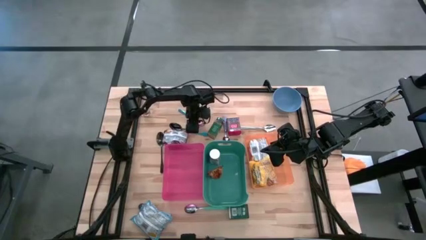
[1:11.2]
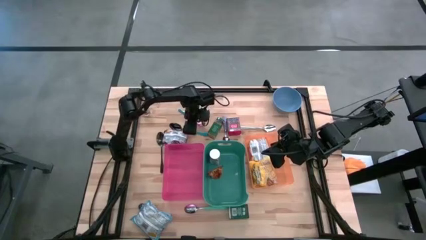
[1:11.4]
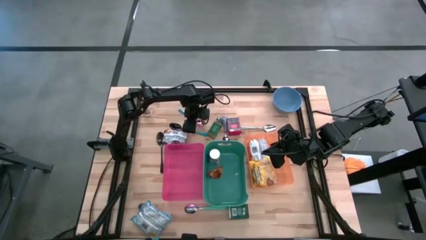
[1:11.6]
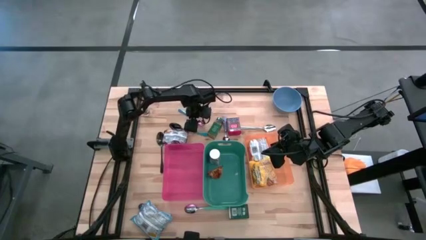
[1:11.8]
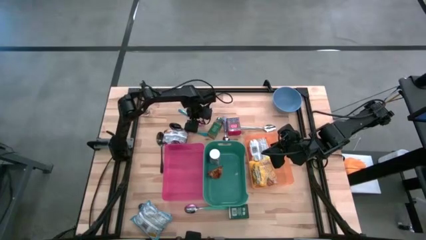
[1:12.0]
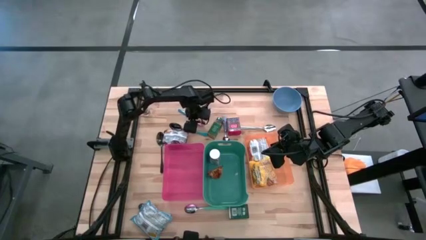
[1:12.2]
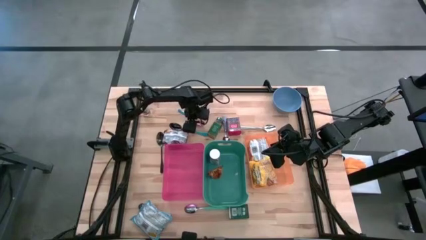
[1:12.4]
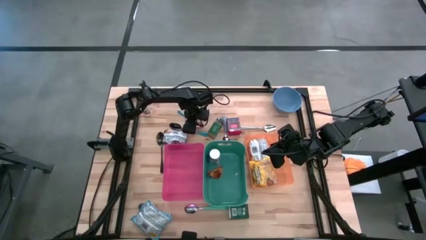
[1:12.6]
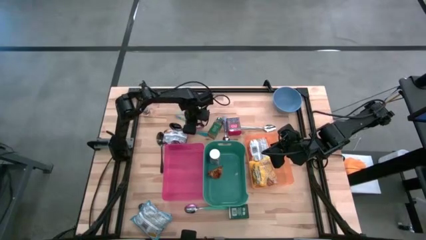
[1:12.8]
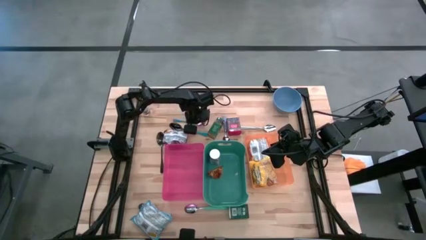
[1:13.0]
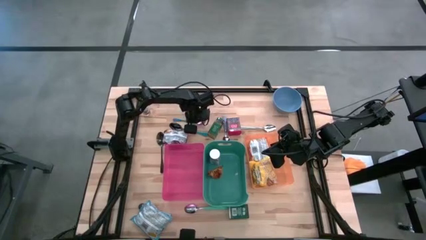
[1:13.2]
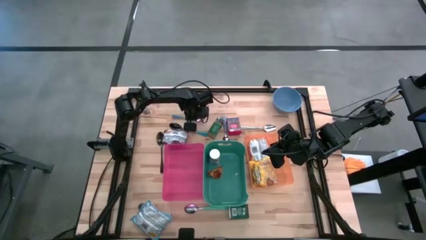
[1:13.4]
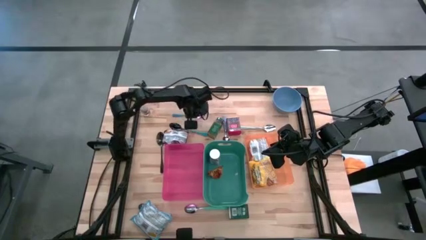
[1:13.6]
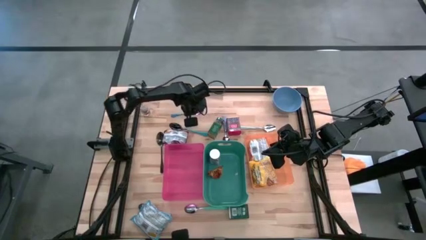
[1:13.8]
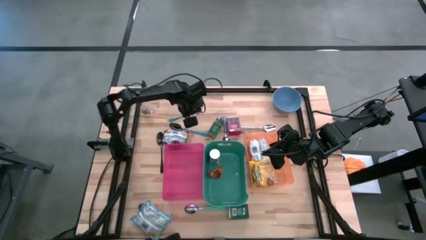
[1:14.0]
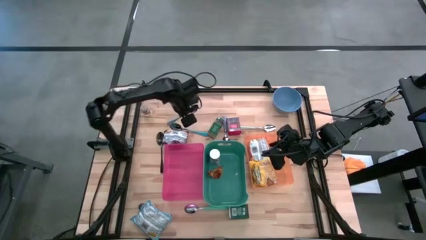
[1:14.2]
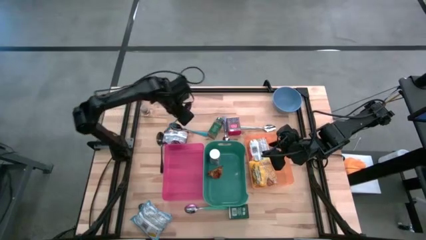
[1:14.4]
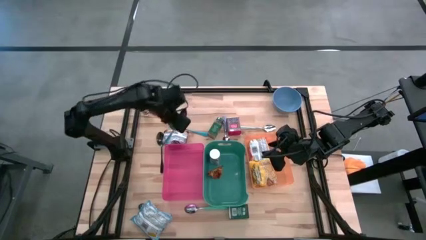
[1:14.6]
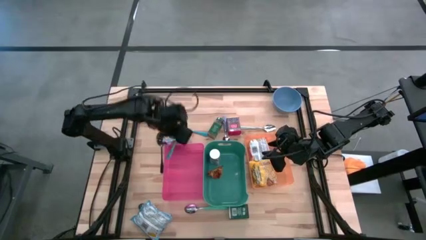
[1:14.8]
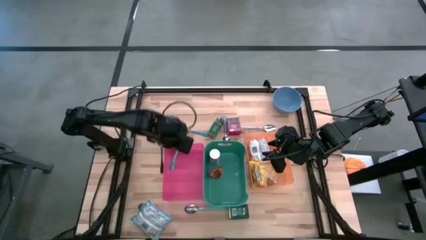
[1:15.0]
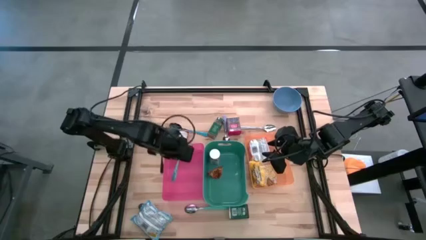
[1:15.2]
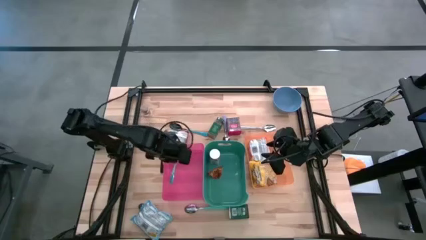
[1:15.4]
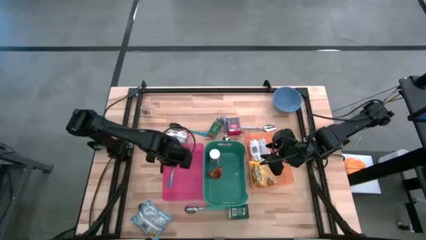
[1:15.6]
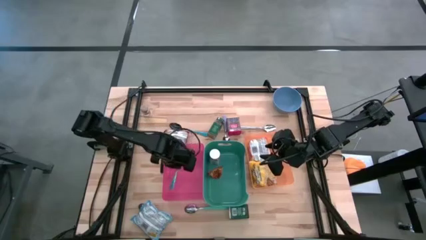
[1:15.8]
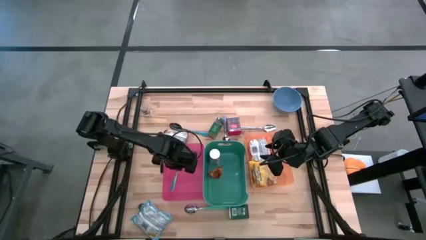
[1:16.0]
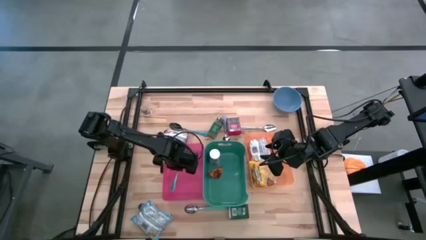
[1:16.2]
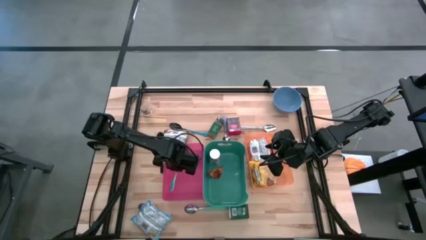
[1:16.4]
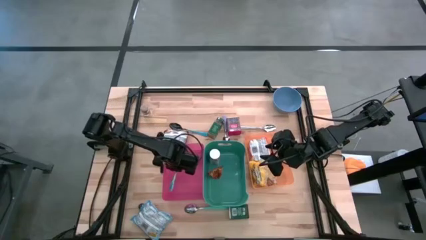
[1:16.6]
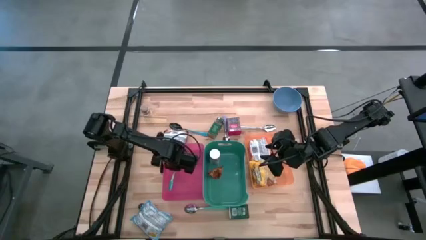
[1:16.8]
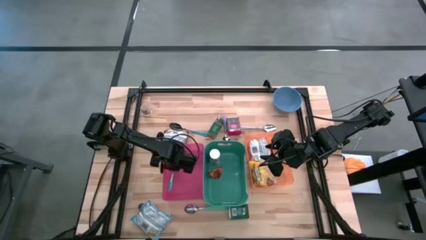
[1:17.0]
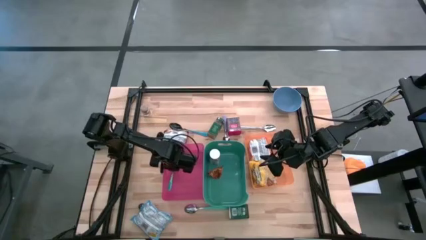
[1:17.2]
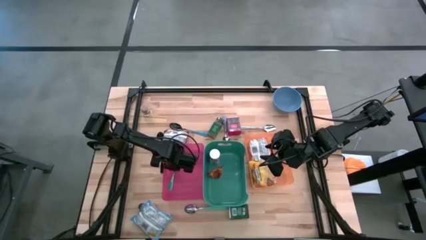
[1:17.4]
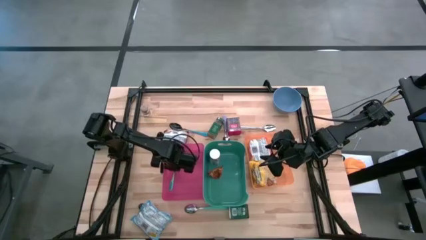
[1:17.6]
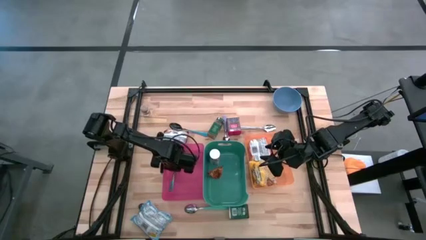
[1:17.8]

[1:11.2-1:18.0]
Put the blue and purple spoon into the pink bin

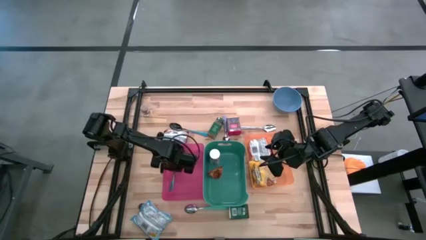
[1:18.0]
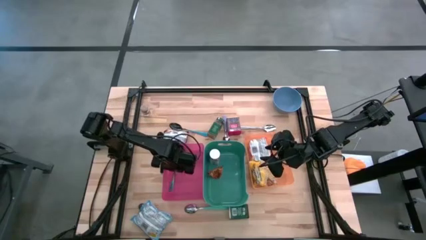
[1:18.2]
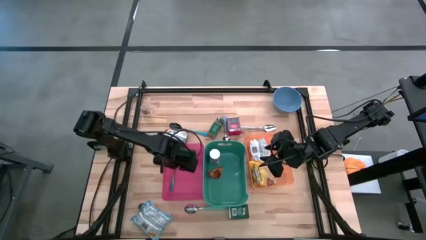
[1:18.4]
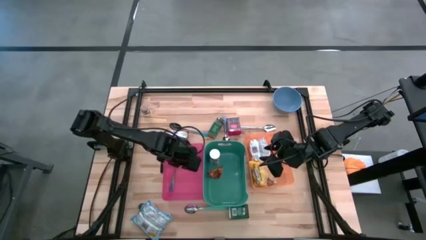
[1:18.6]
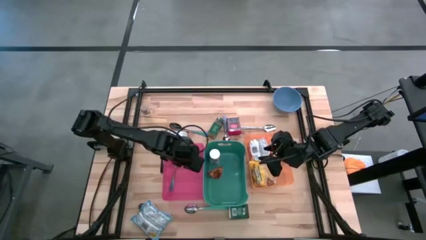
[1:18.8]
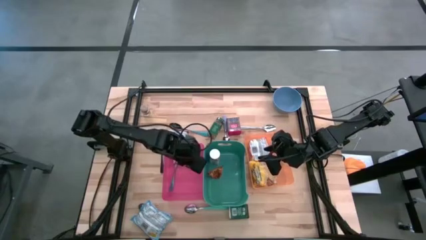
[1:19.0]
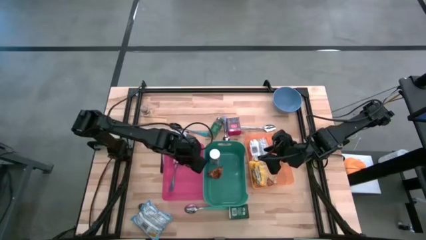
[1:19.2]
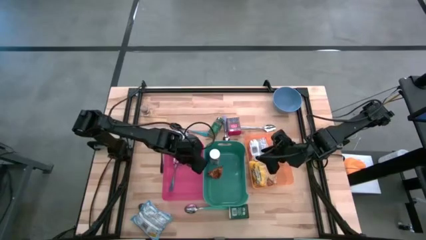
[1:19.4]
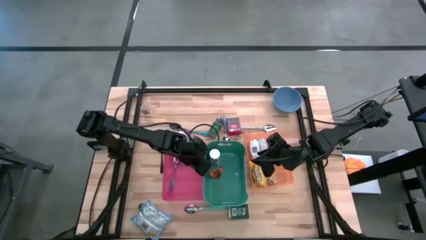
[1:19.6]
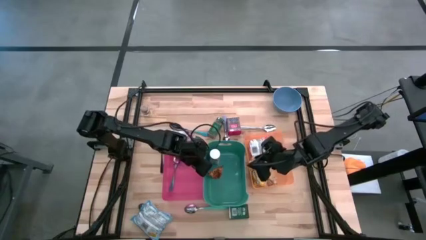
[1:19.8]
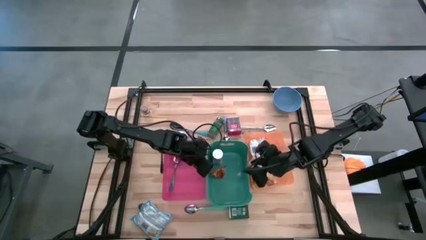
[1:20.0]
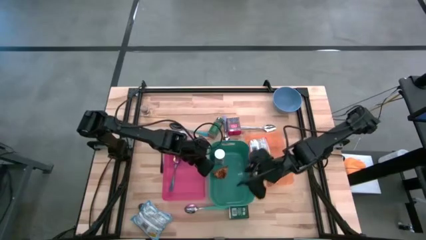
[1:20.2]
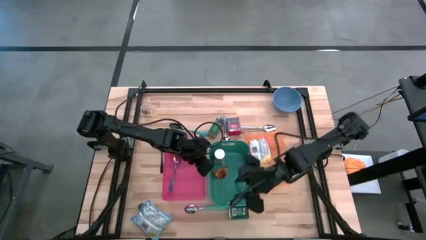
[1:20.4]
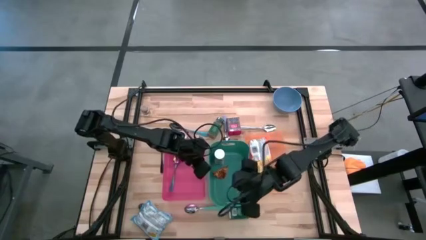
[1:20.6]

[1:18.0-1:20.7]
Adjust the green bin

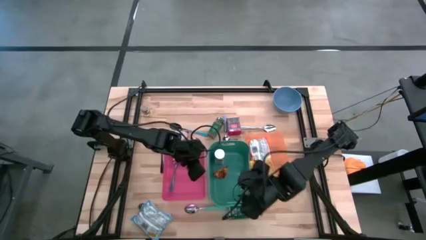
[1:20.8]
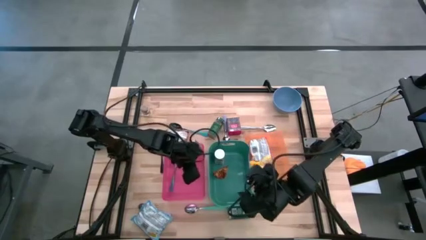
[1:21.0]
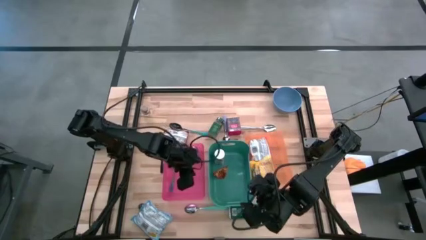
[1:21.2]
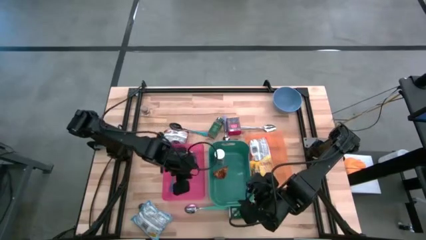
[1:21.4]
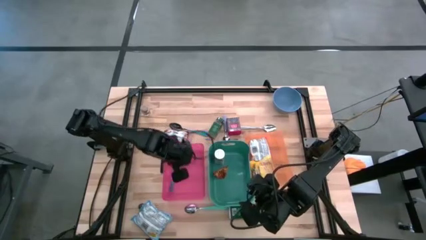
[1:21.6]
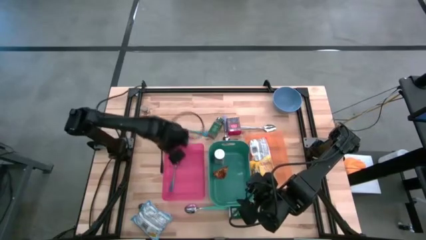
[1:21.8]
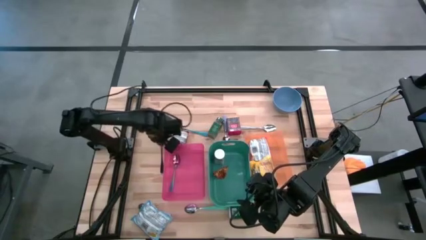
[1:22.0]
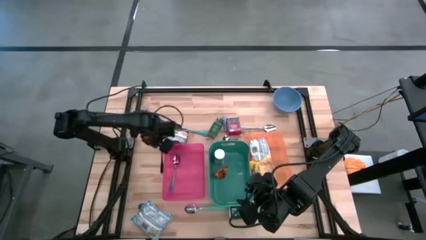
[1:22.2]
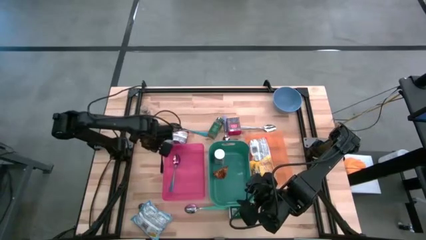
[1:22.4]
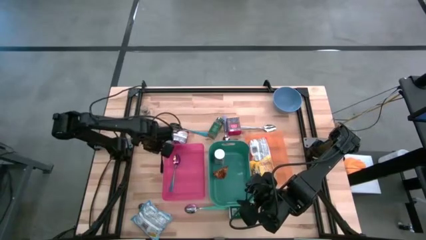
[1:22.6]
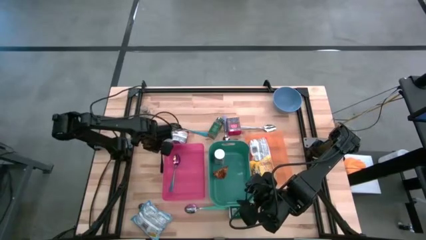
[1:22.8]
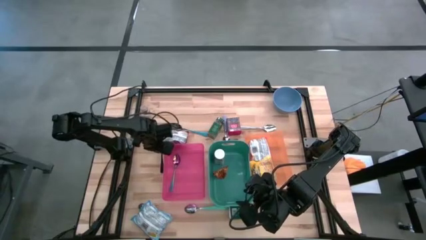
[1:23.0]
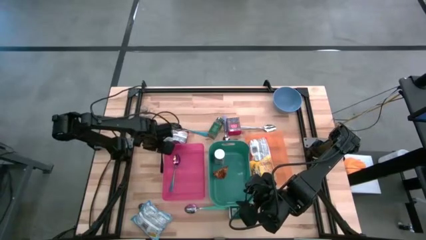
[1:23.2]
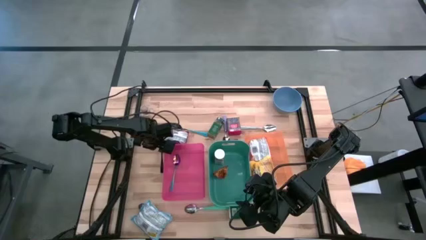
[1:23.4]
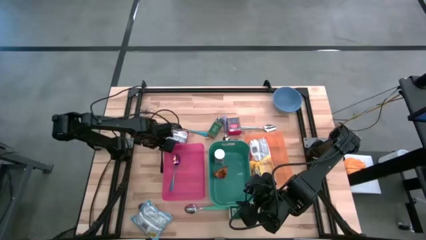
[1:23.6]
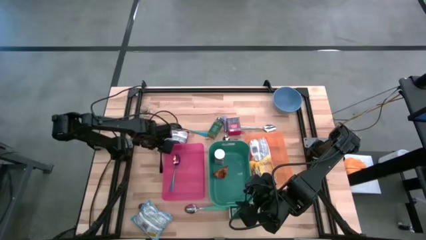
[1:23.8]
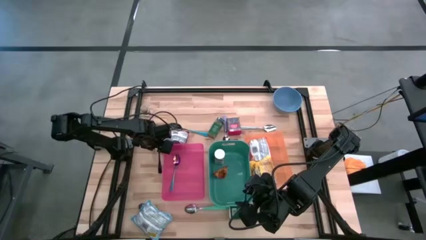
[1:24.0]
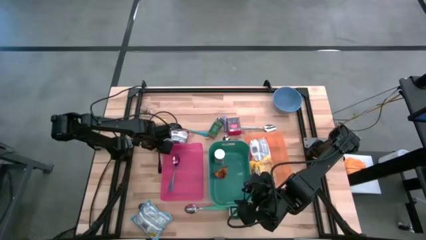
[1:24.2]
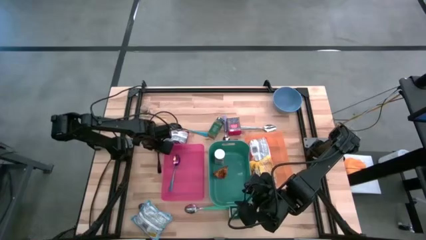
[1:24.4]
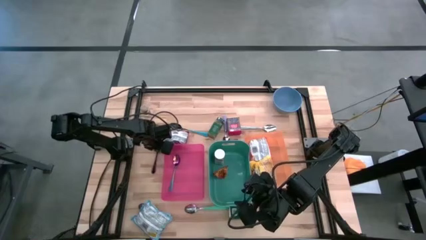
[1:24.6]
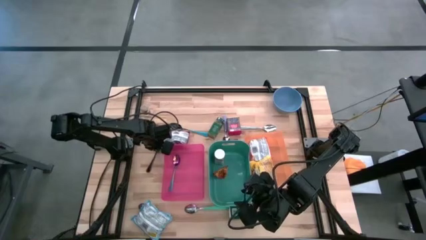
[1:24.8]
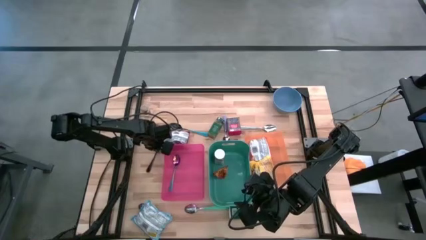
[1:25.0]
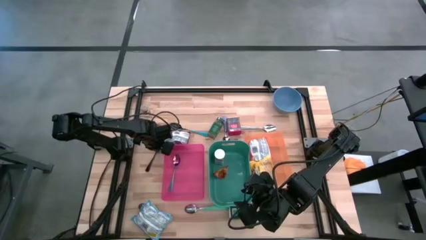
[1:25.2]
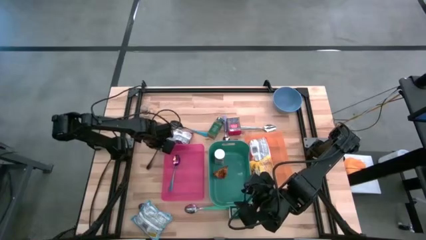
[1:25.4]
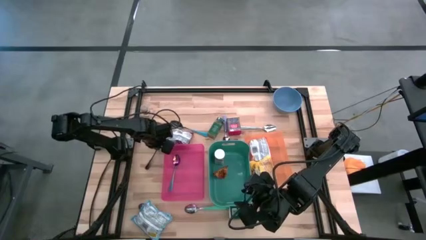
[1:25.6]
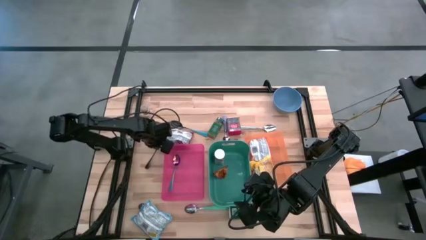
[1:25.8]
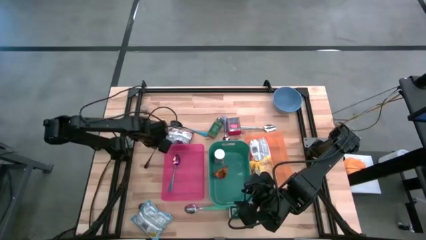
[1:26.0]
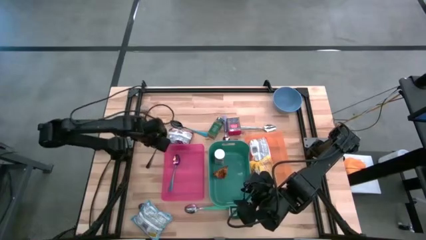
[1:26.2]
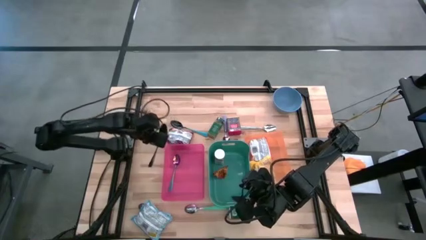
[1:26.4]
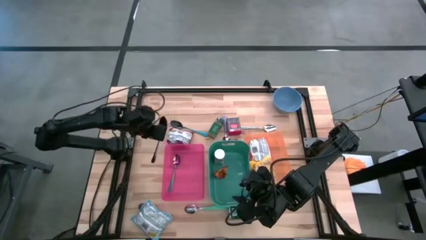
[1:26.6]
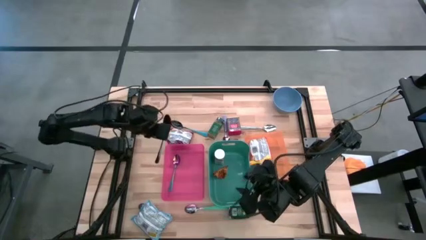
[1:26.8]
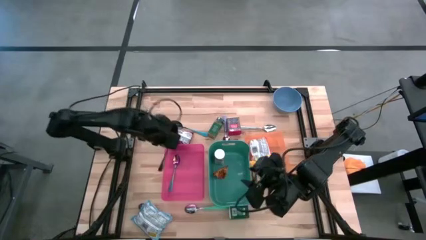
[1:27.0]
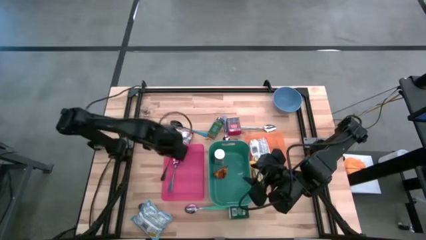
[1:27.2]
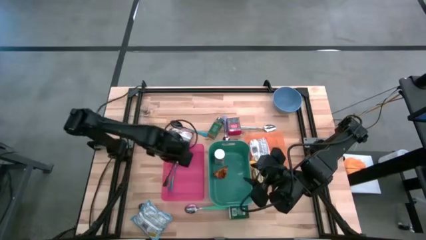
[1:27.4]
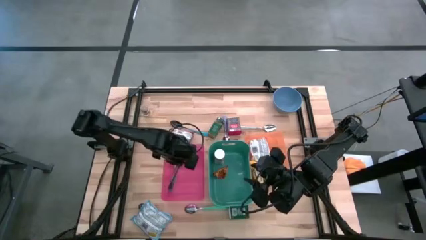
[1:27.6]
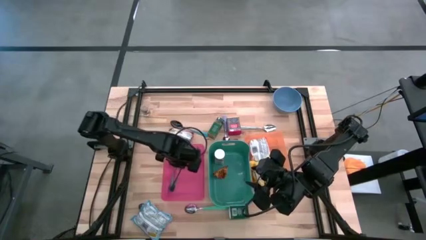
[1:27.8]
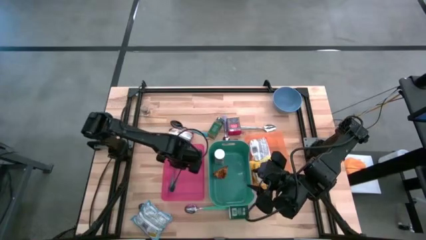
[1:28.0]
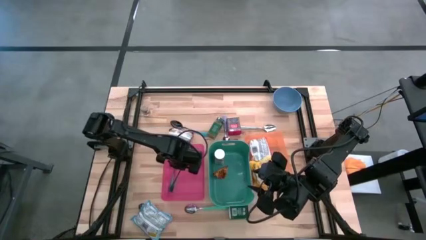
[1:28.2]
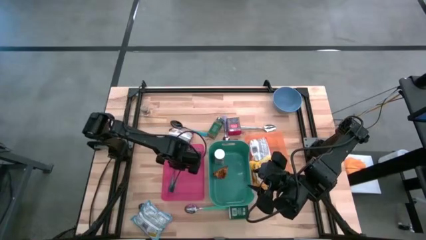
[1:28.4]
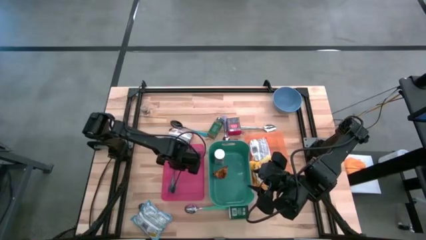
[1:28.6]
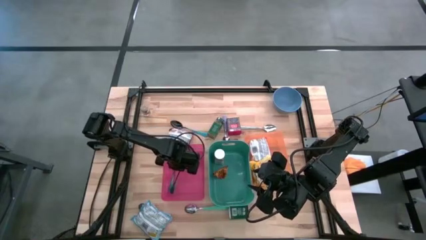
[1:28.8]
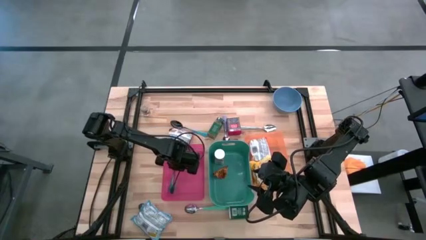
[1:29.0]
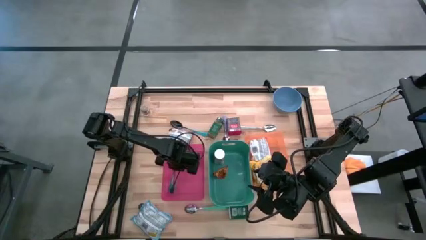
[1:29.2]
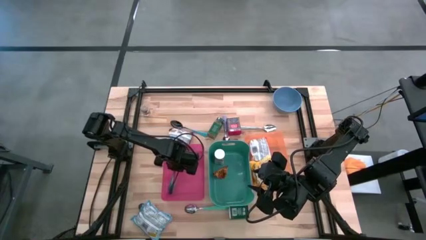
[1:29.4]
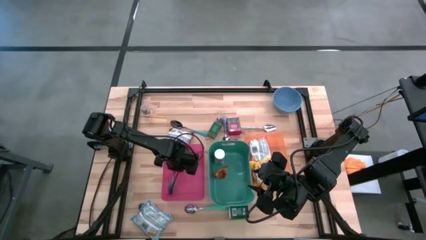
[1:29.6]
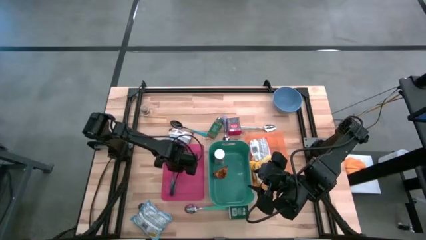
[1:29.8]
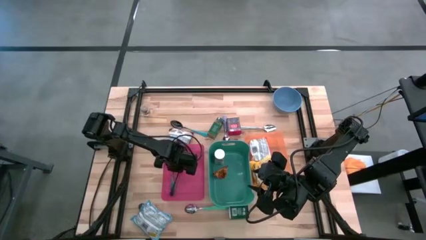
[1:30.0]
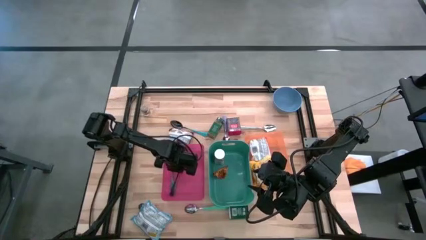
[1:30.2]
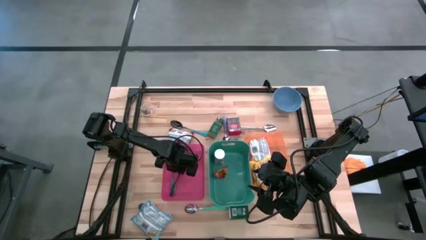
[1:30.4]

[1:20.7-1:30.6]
Put the black spoon into the pink bin
